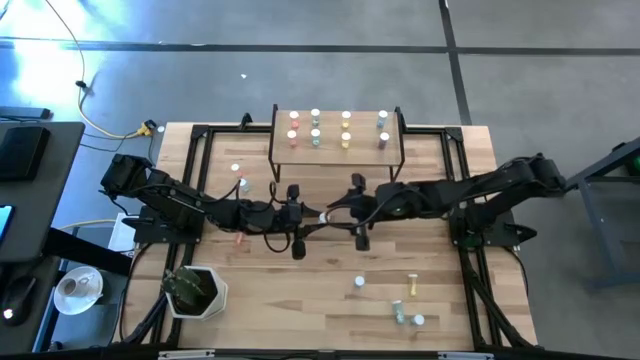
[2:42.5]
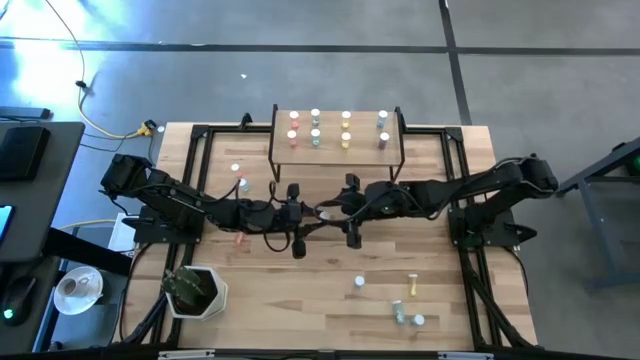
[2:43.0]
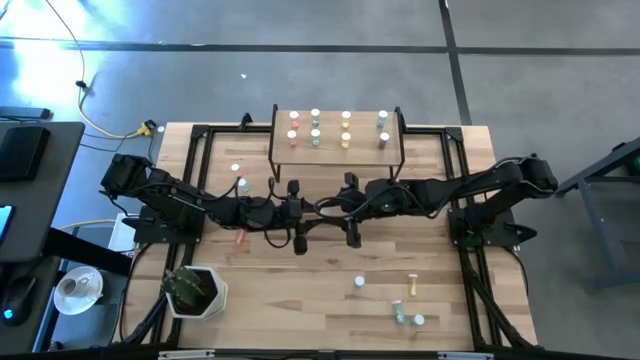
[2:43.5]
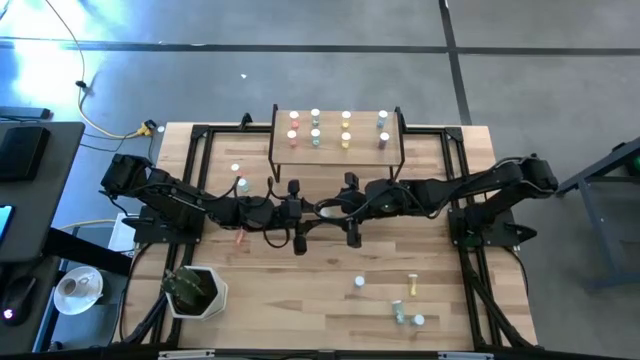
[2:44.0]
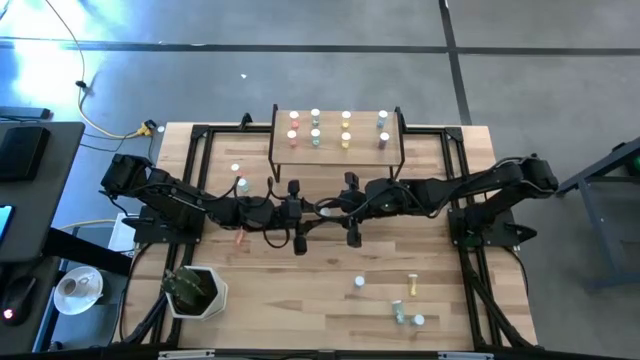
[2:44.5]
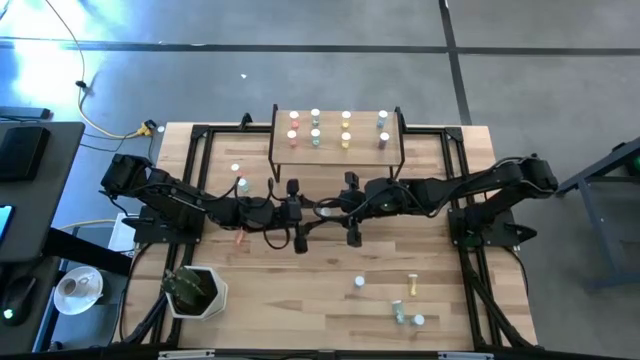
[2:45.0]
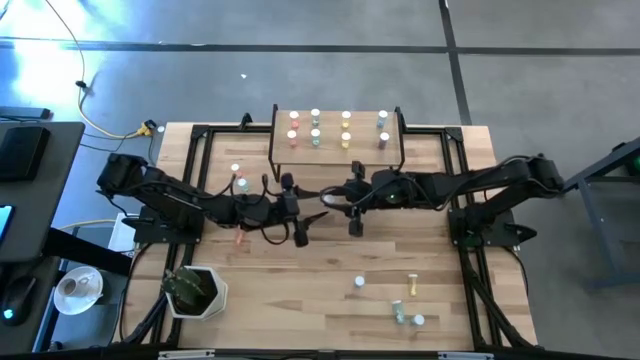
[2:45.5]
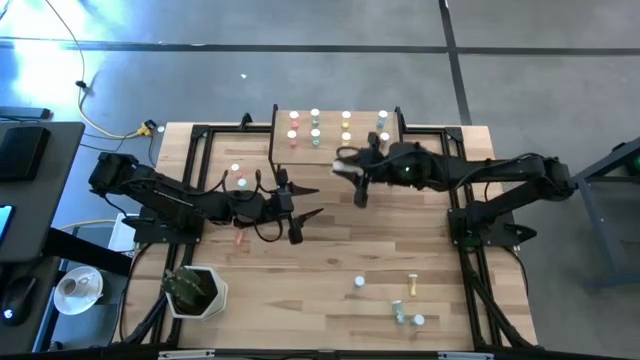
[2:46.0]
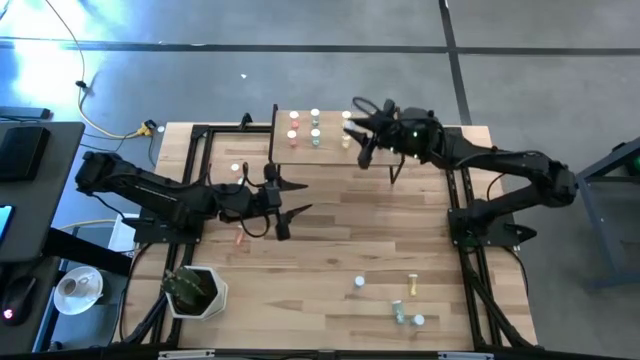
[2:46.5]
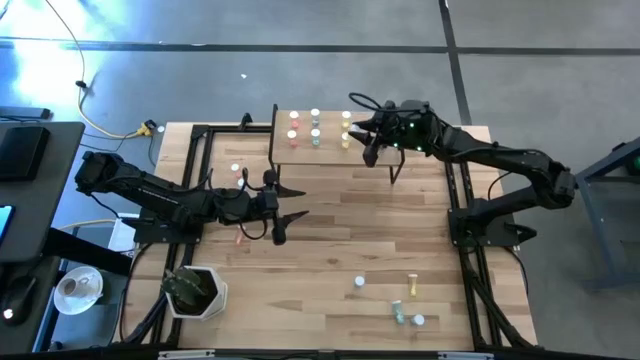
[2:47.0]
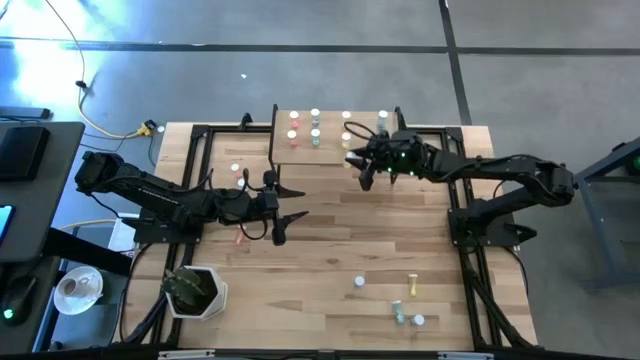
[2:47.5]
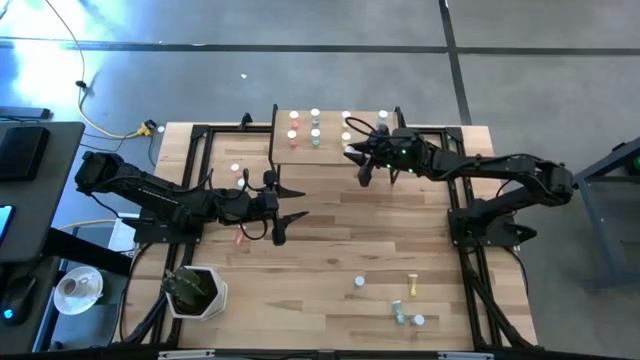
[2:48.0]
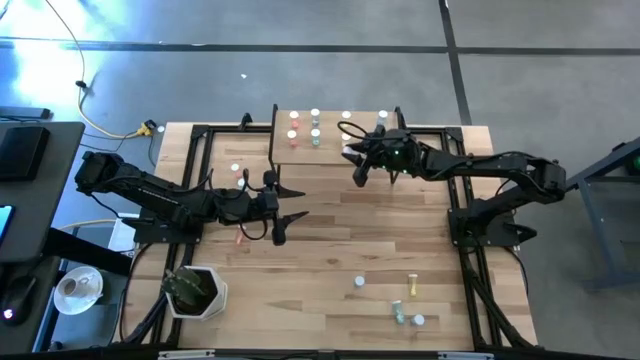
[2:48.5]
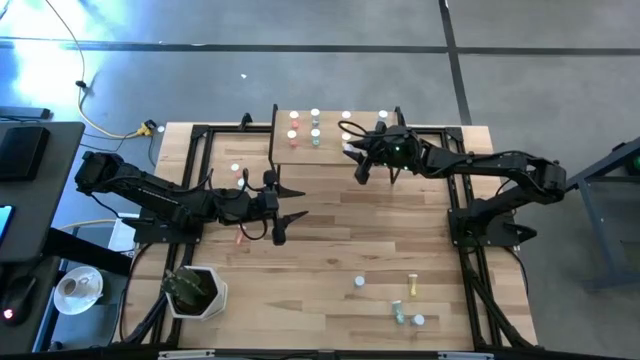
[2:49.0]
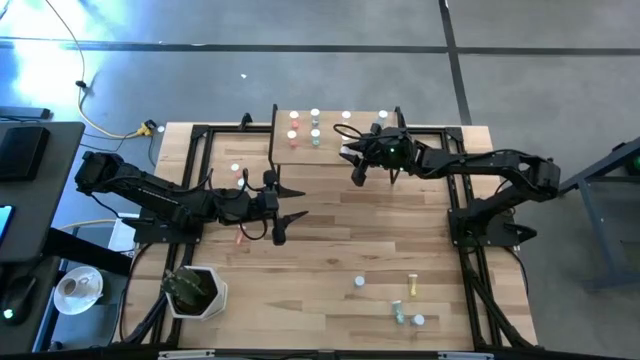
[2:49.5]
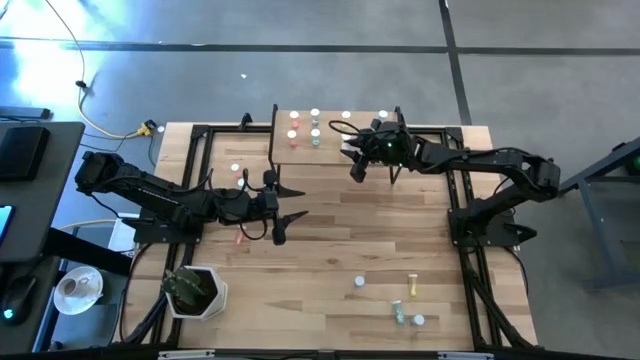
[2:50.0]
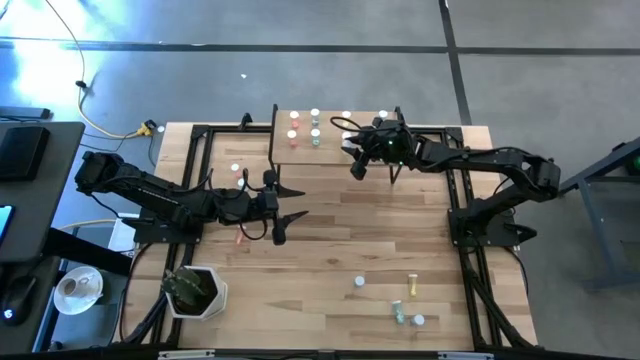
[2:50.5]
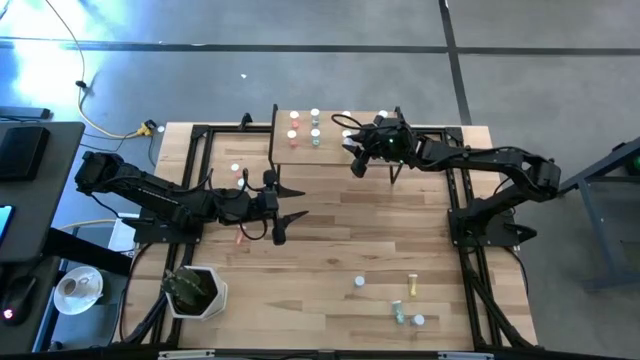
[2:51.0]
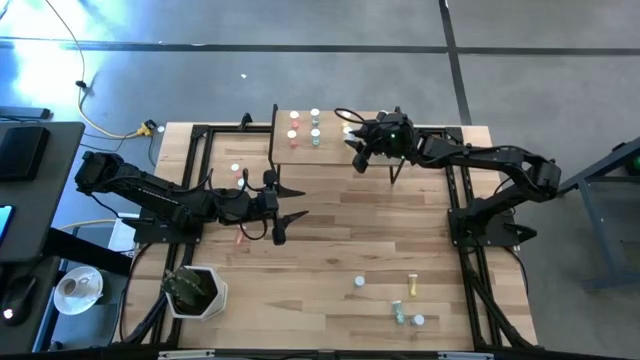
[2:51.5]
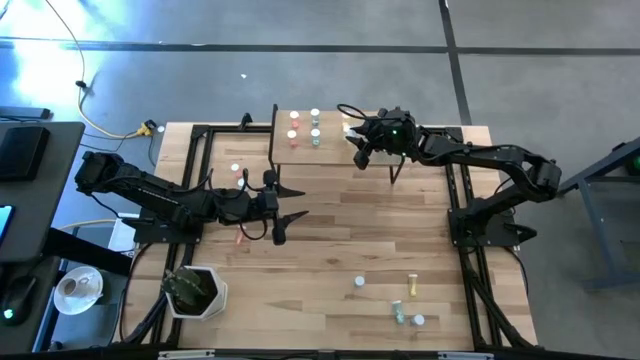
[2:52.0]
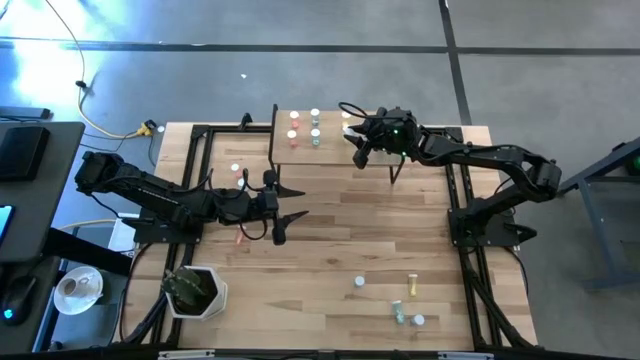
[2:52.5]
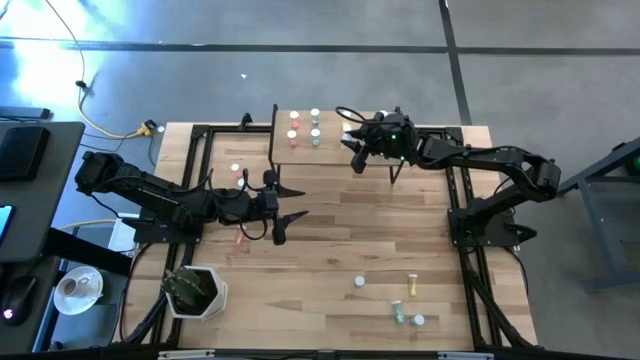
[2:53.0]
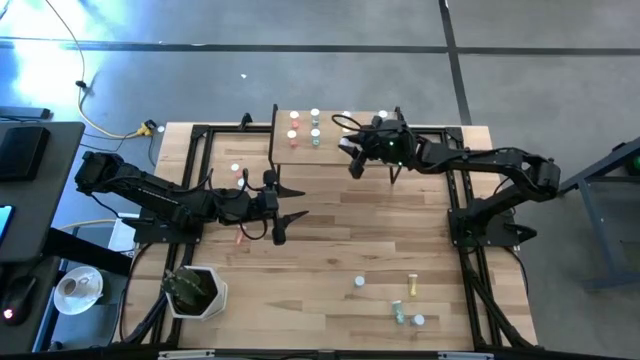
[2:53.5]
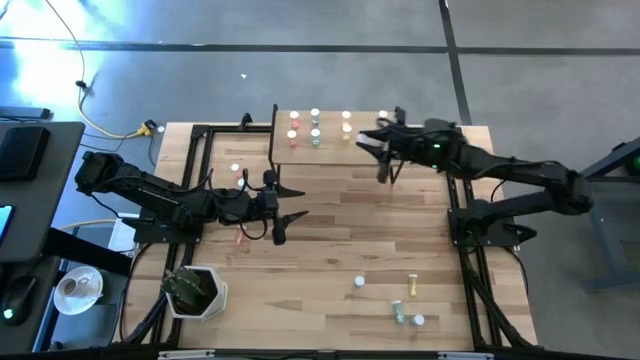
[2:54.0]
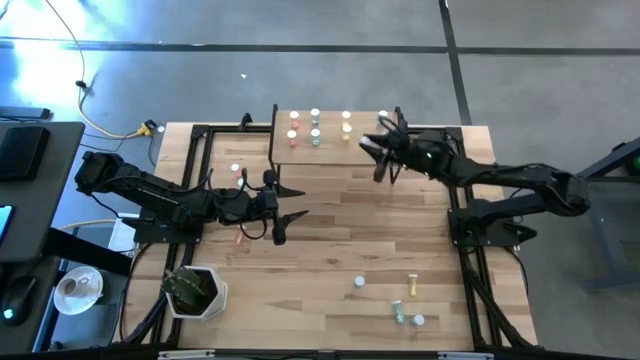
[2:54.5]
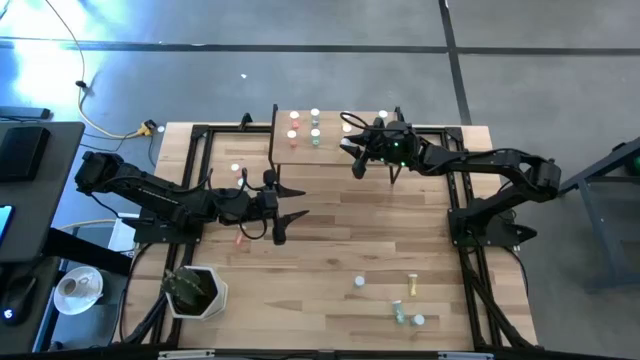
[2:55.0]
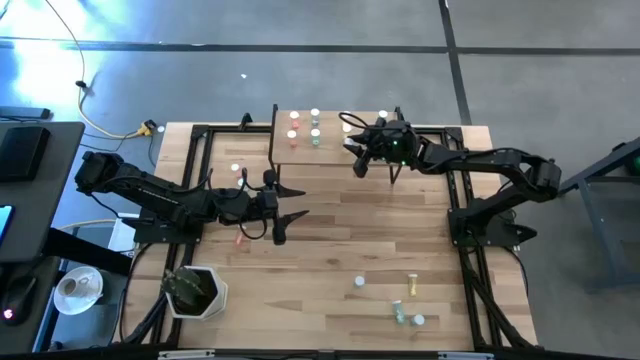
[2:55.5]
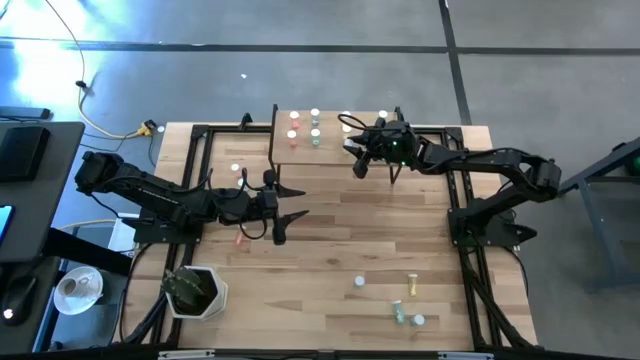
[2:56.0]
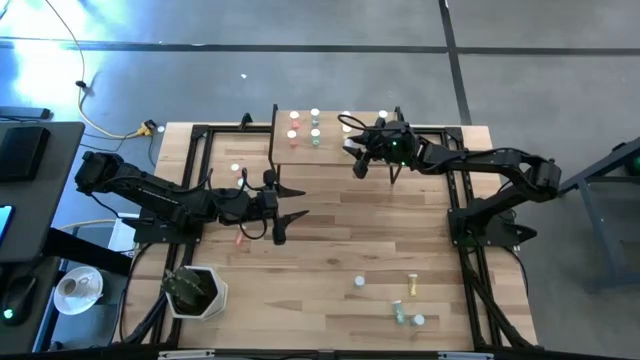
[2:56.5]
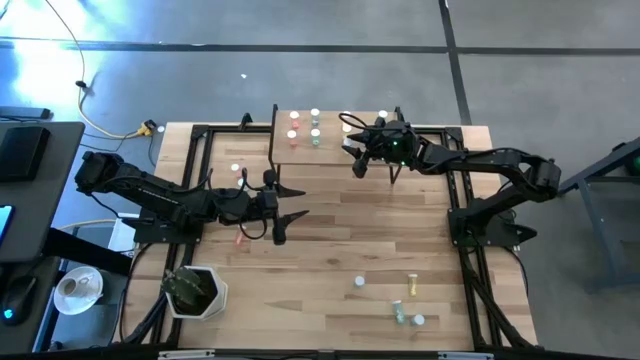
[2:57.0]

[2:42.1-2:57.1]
Task: Pick and place medicine bottles onto shelf by color
Put the yellow medicine bottle on the shelf

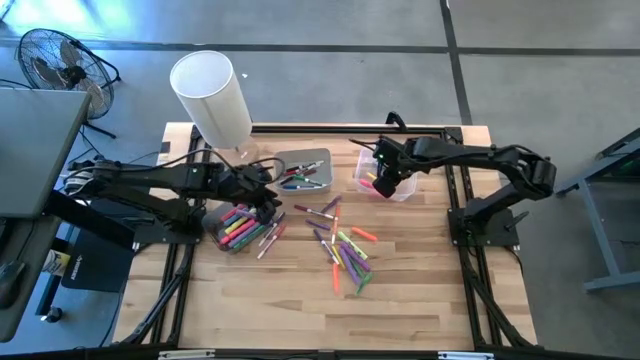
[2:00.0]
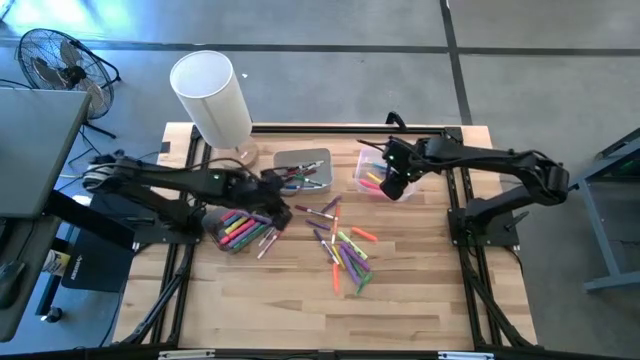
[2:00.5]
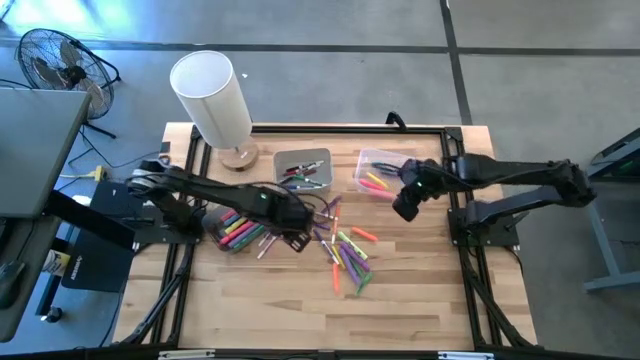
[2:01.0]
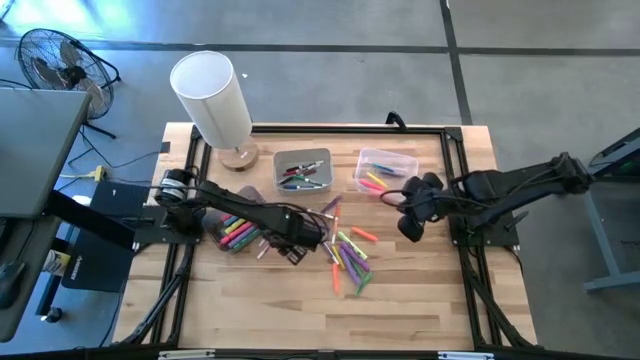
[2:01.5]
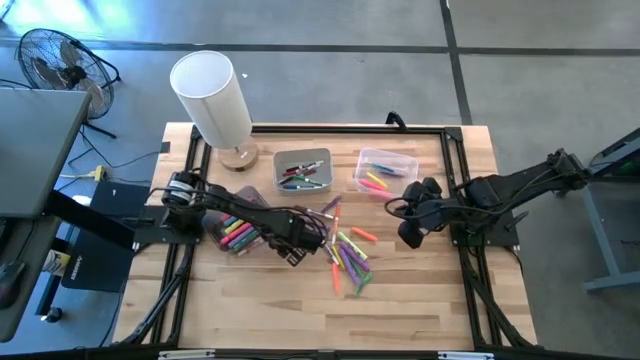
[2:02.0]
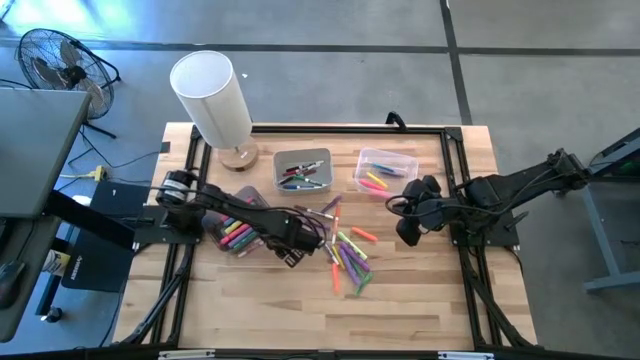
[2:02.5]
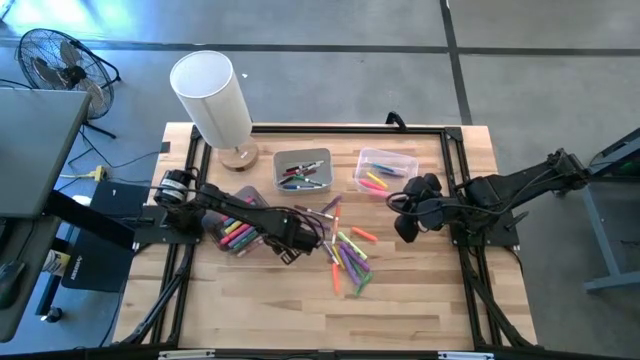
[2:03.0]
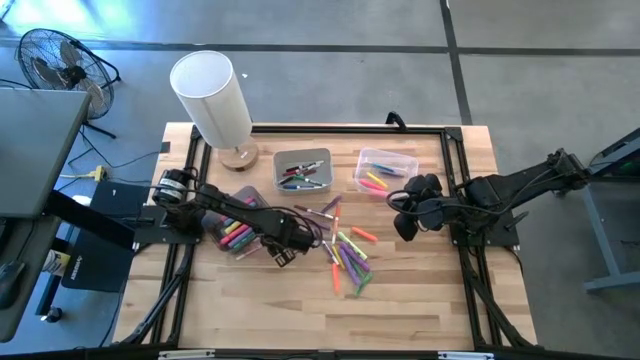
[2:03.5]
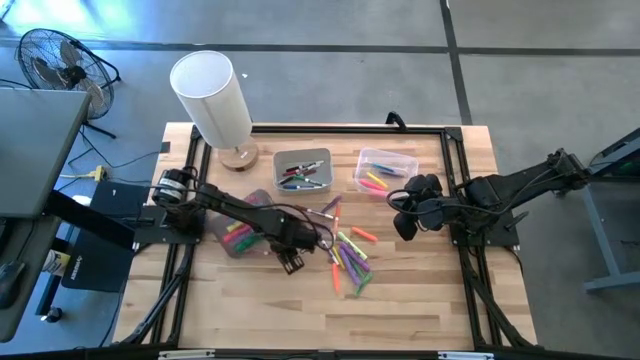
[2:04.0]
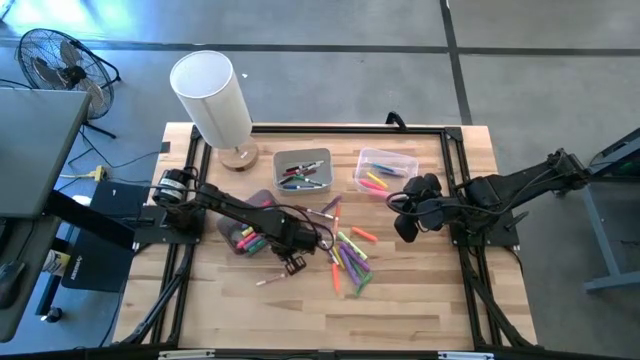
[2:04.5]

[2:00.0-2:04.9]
Task: Pick & Place Markers
Put the pink marker pen into the white bin

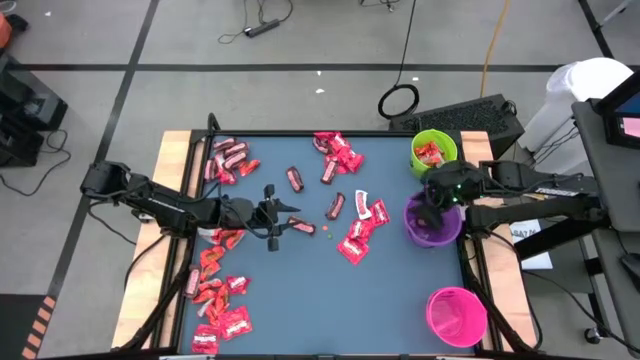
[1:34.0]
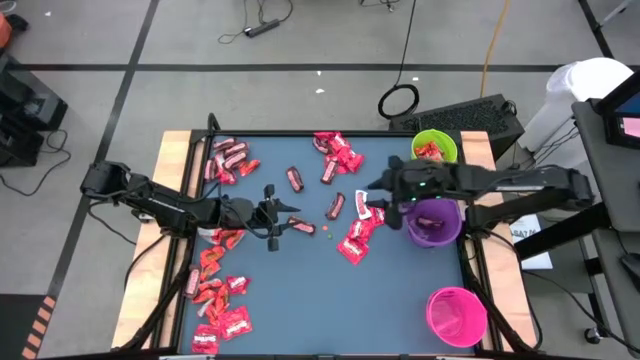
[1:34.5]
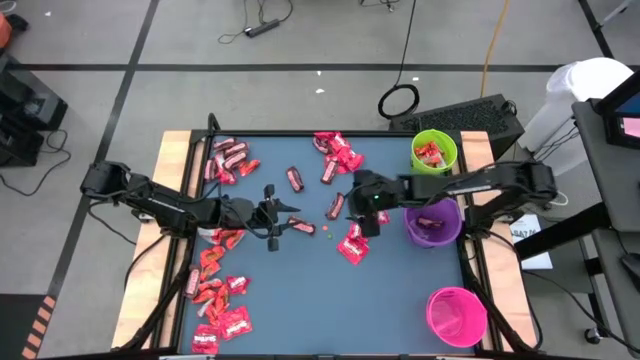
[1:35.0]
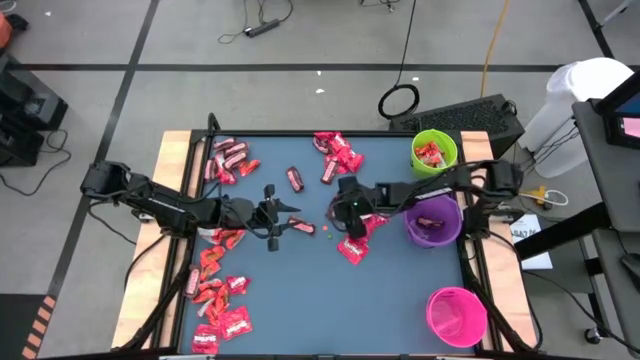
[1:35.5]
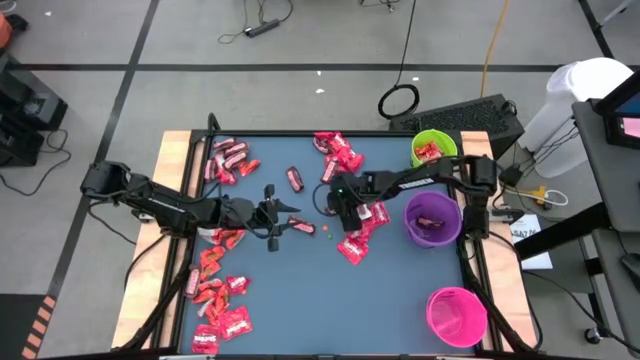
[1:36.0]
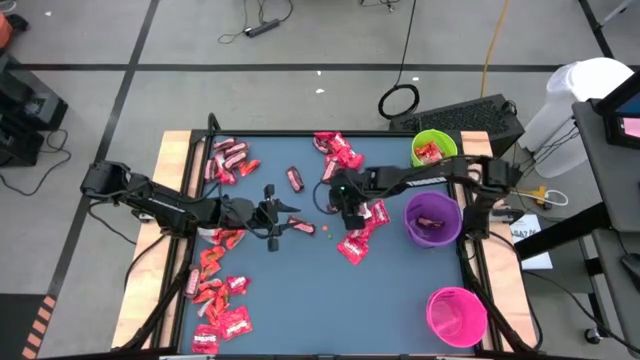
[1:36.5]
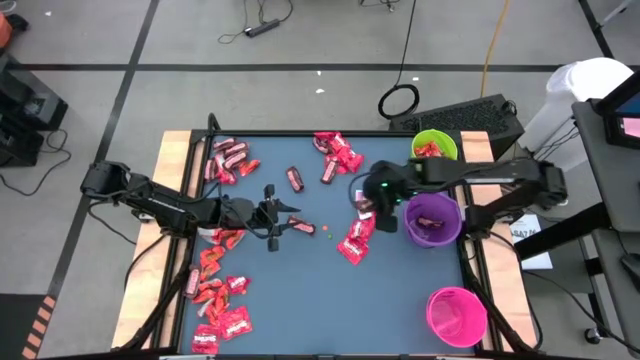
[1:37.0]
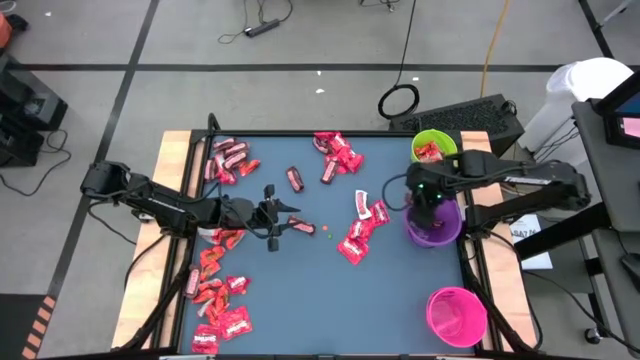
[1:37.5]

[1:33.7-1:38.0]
Task: Organize candy in baskets
Put the brown chocolate bar into the violet bucket
